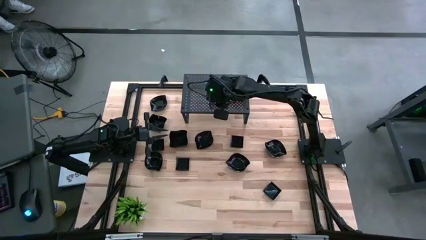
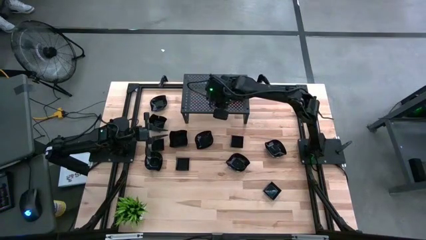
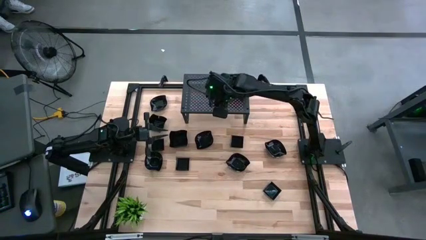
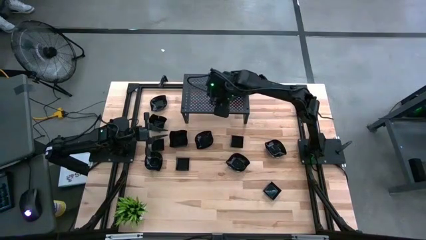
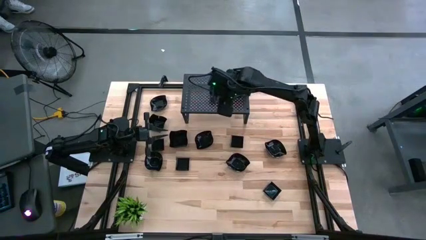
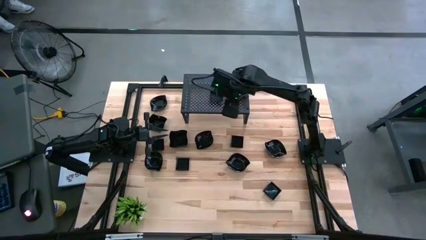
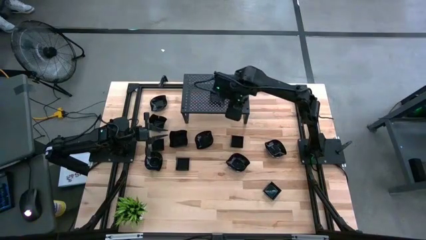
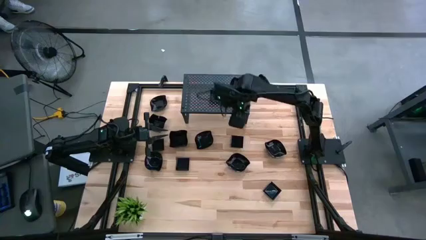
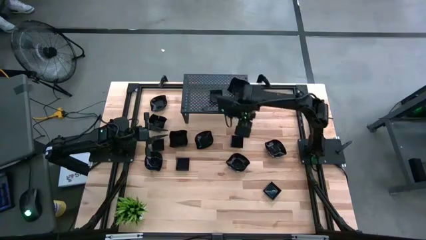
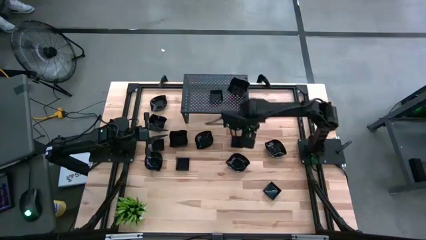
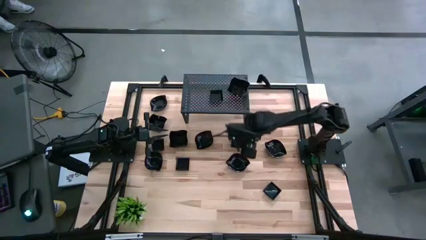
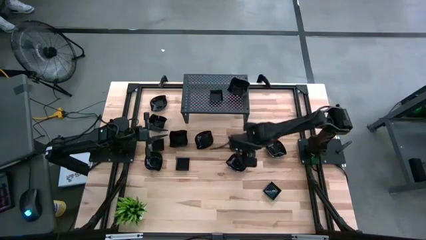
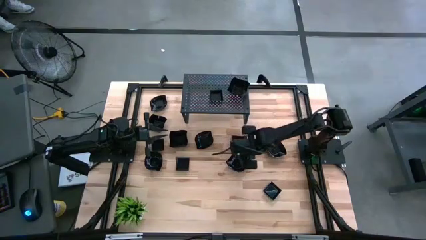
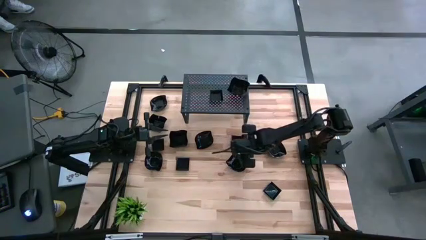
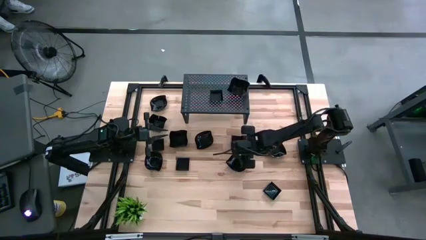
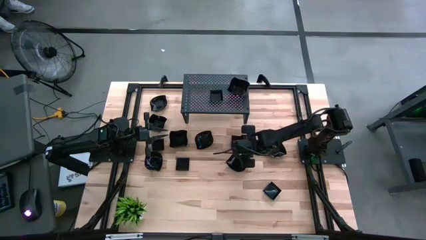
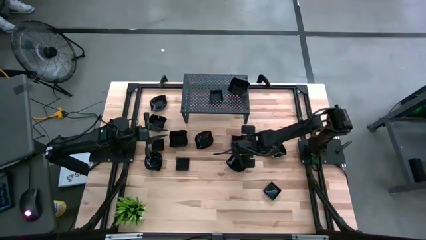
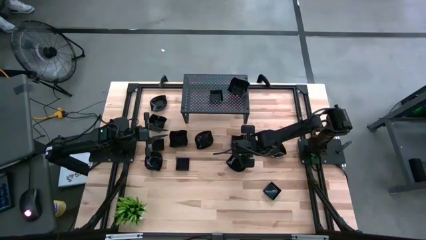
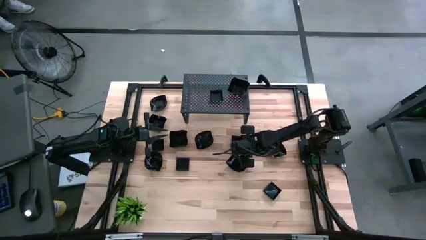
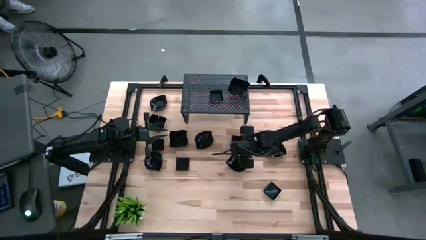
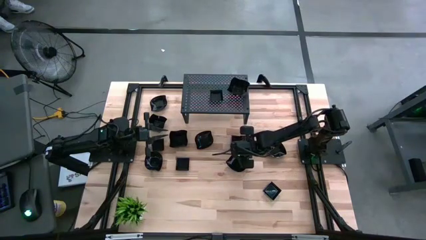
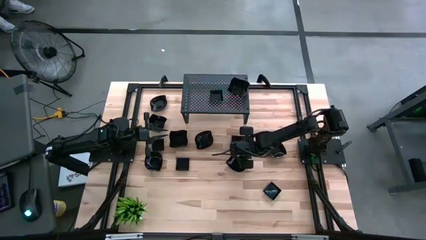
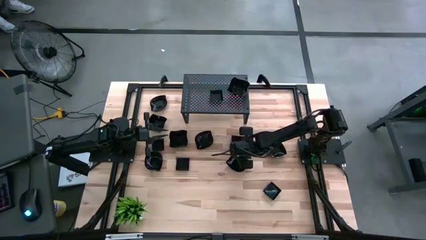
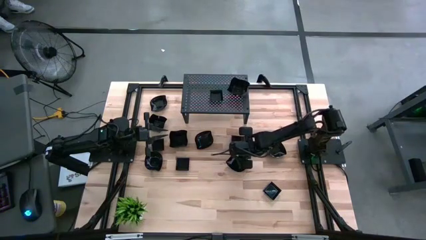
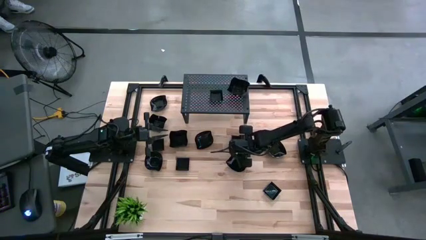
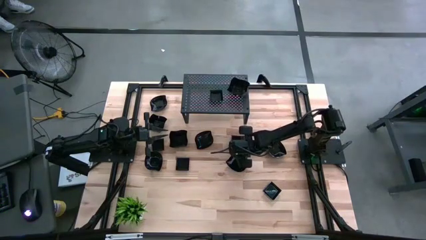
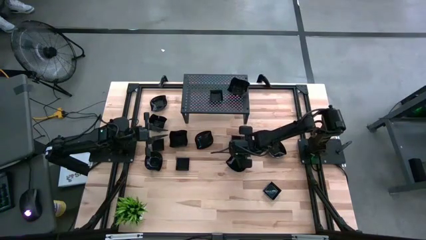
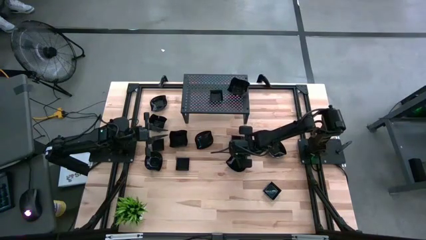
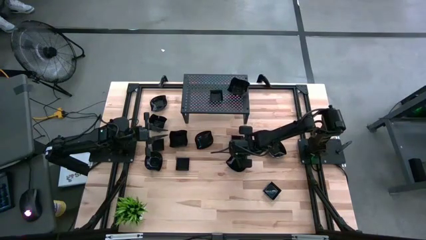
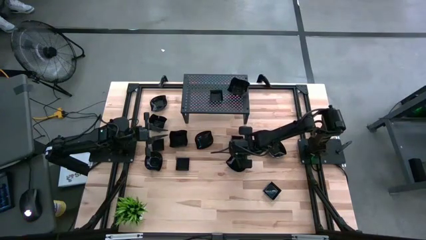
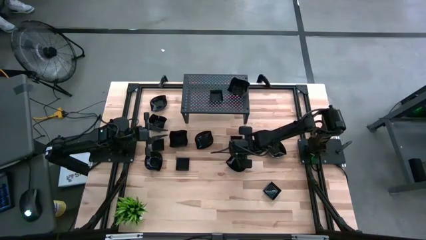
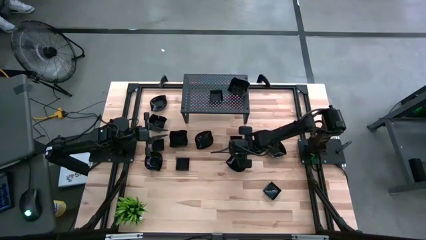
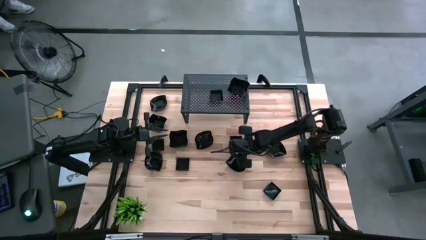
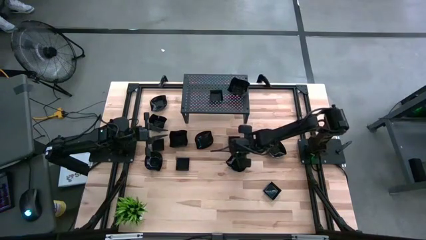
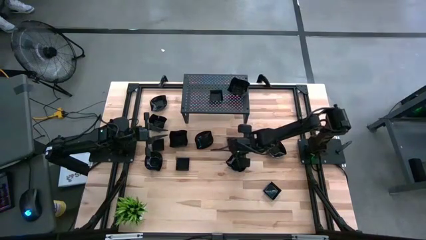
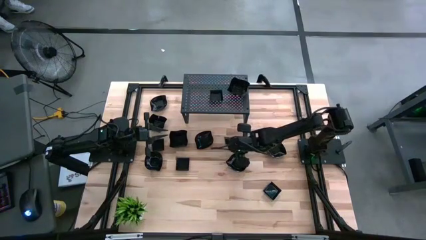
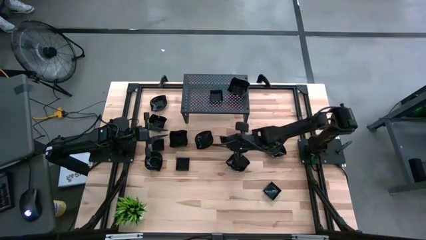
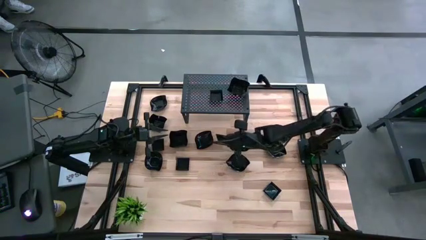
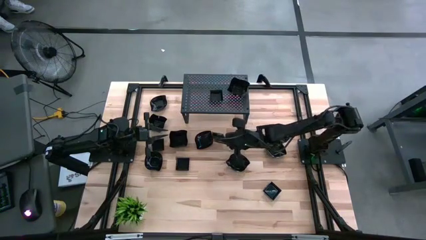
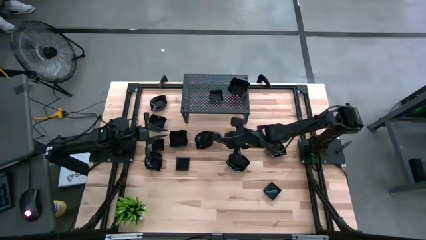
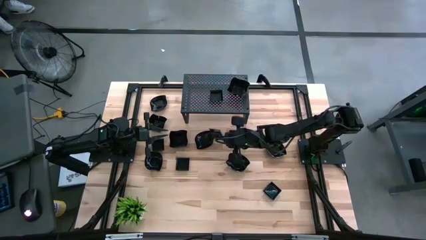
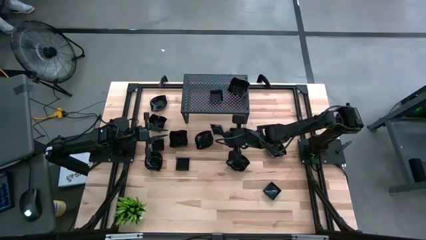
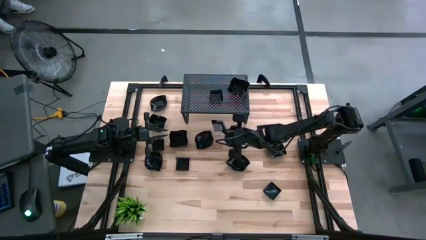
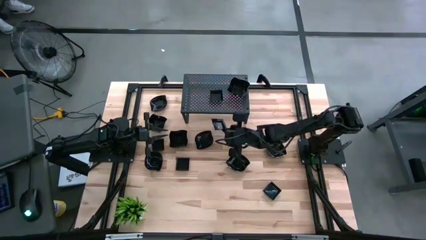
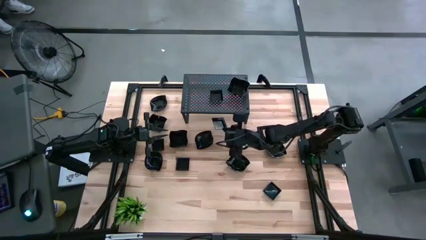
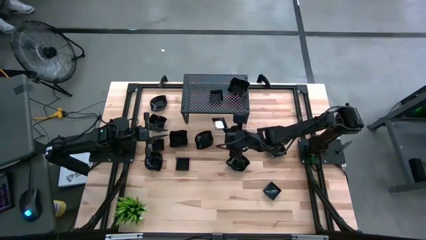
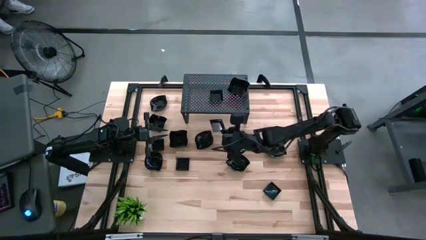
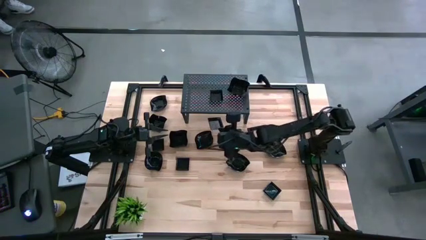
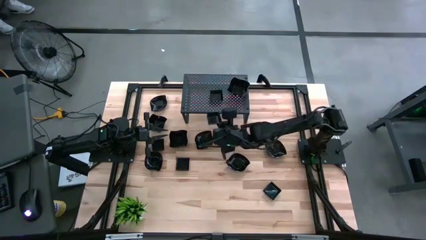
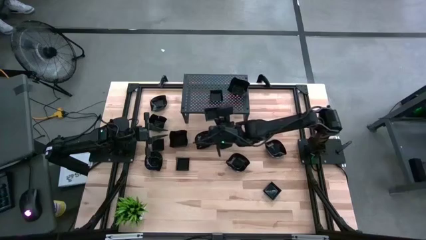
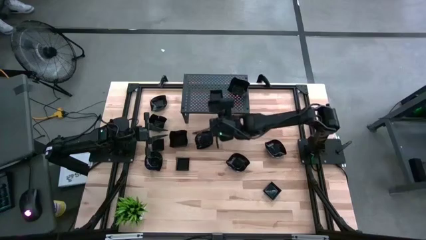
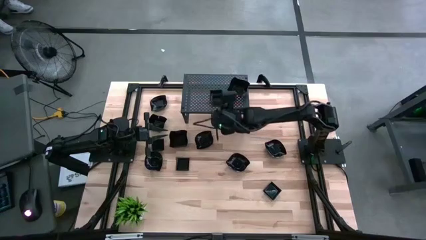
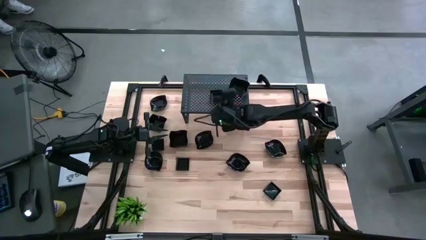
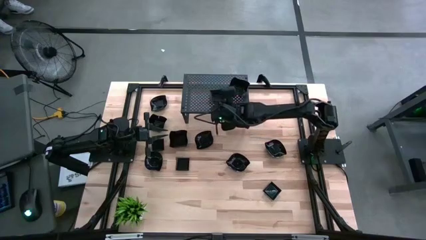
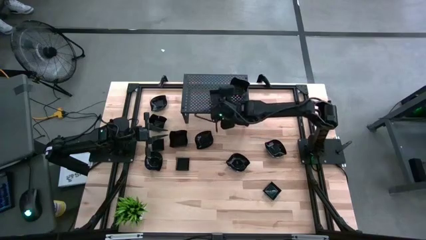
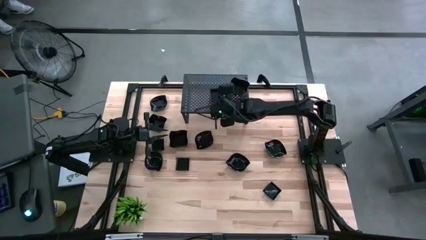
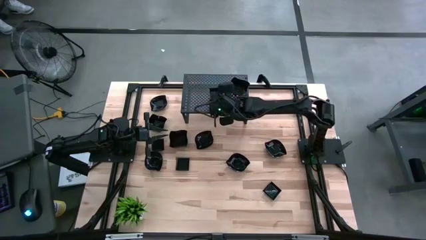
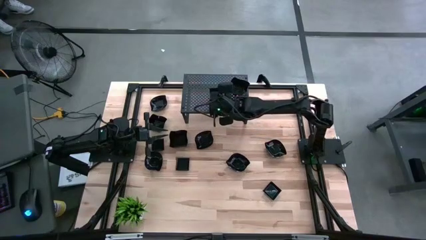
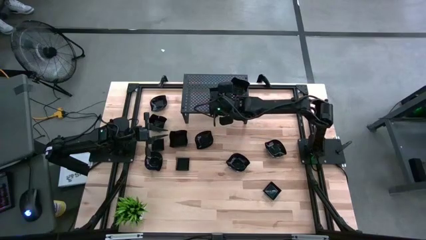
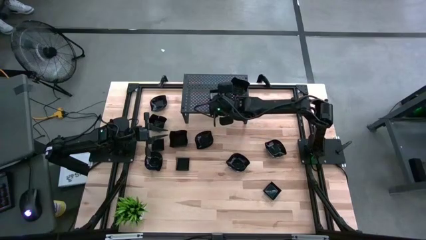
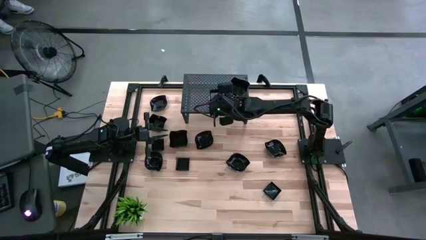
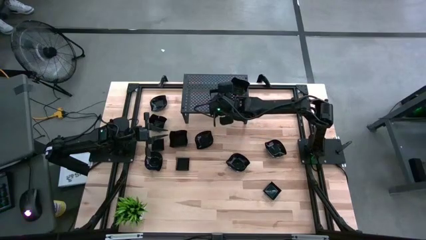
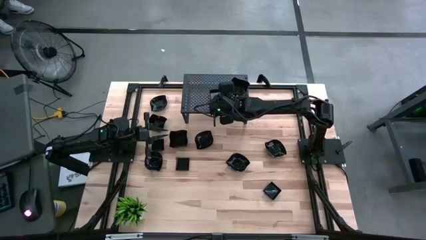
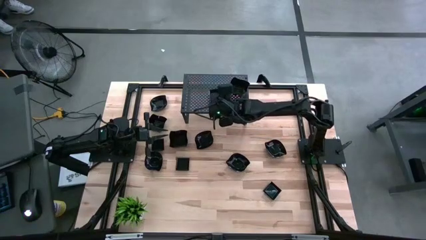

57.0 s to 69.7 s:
Task: Pick & Place Mini shaped plates
Stack the black square plate on top of the black square plate on the shelf

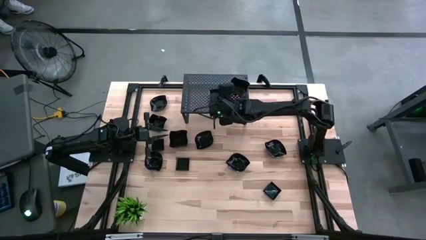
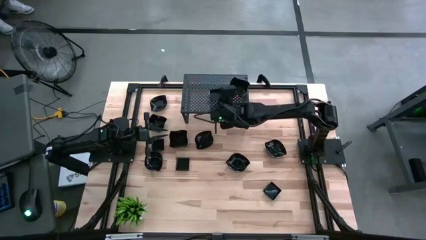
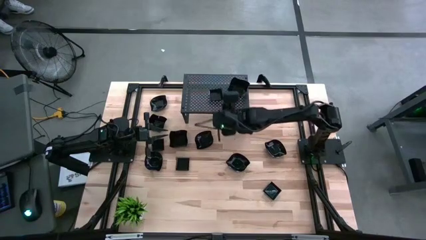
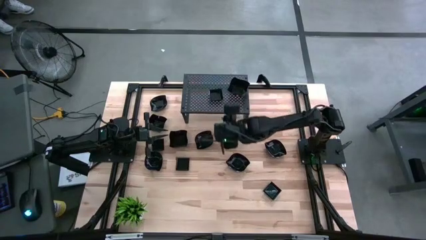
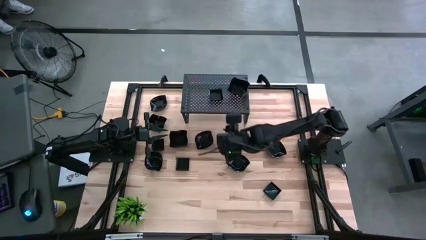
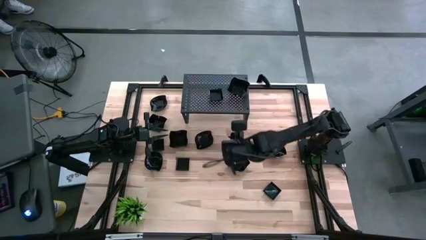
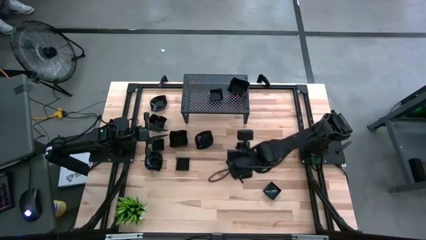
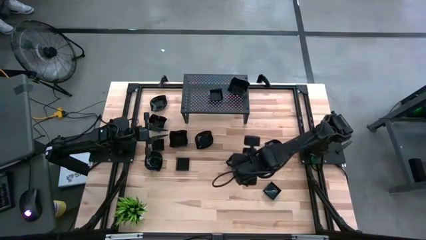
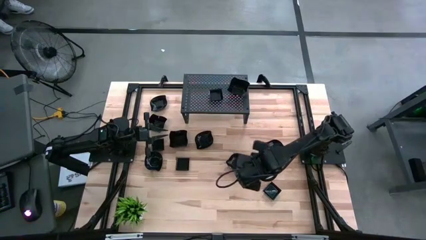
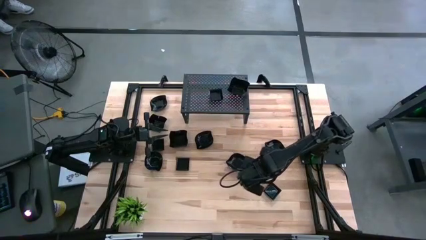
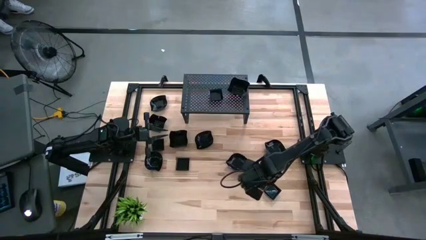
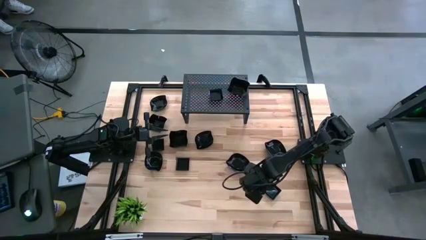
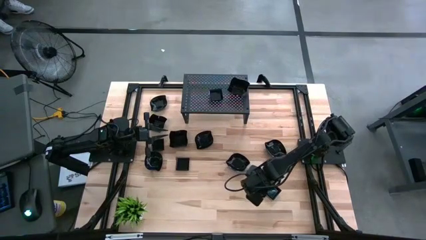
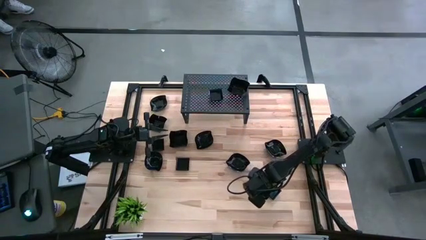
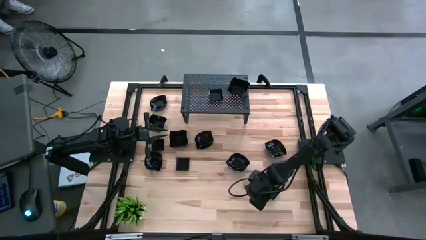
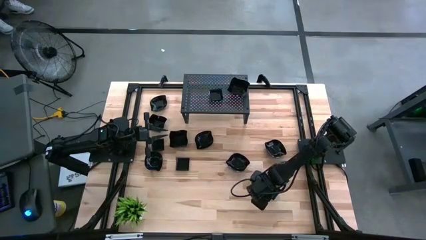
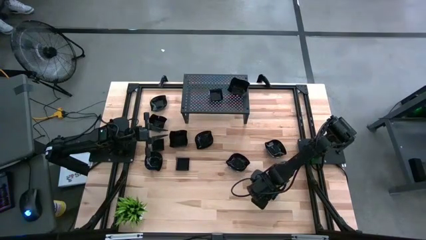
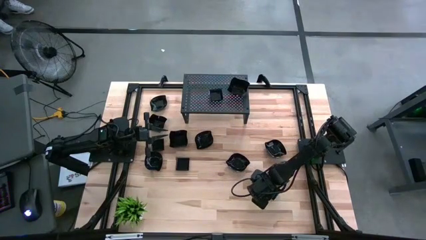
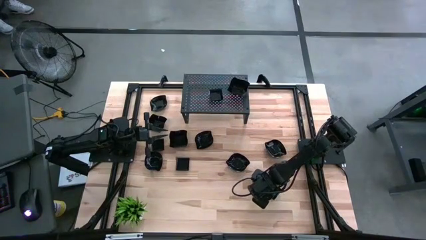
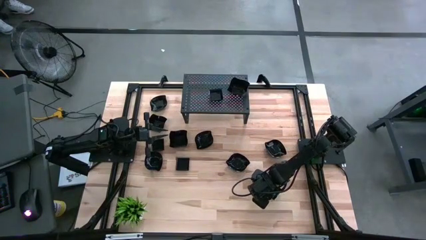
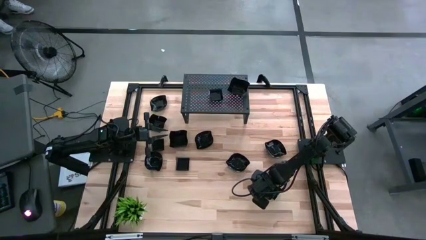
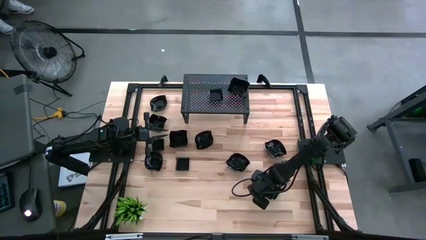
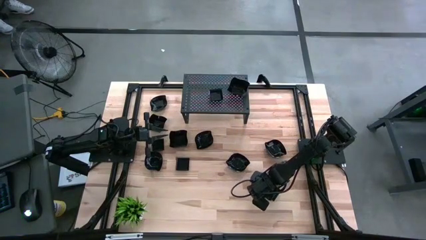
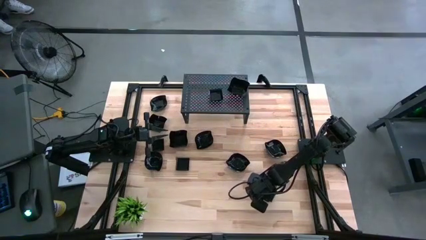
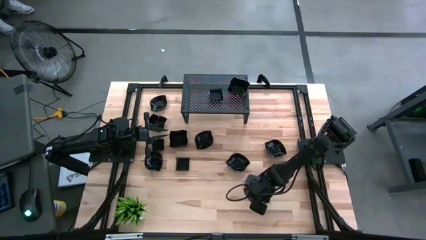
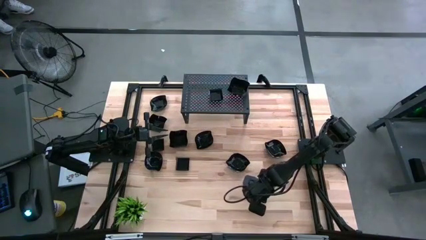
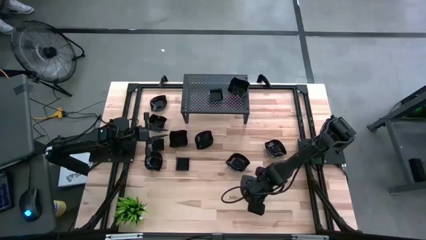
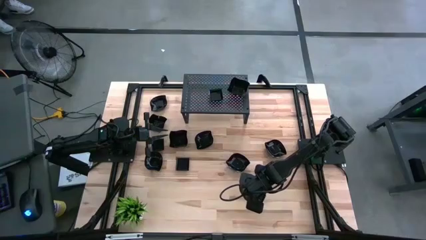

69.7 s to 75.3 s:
Stack the black square plate on top of the black square plate on the shelf
